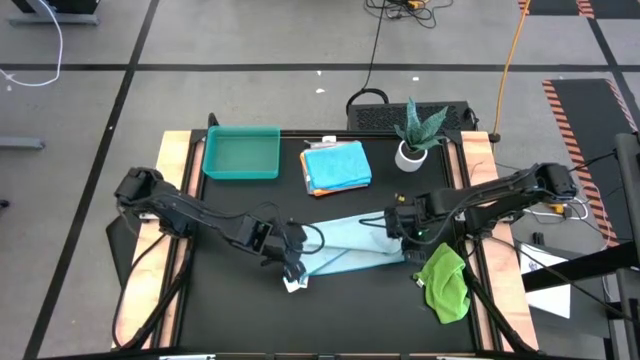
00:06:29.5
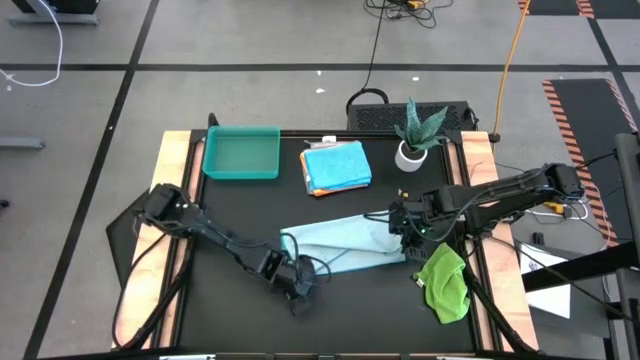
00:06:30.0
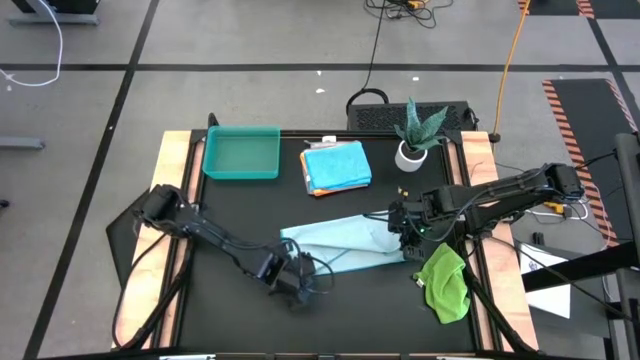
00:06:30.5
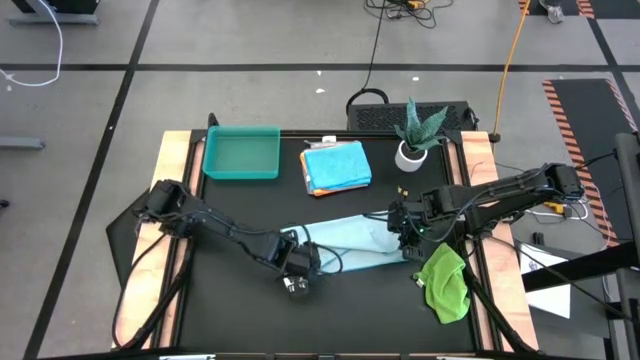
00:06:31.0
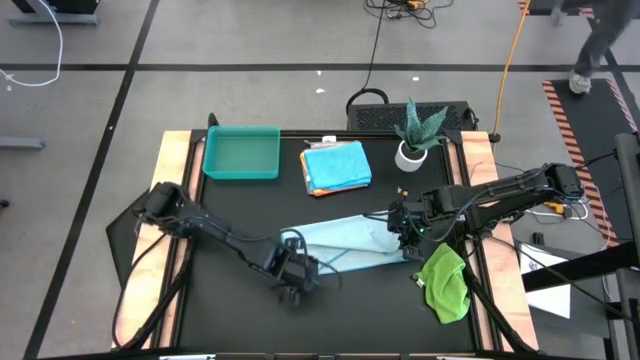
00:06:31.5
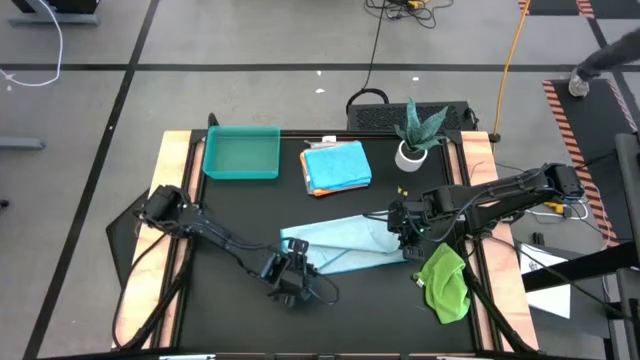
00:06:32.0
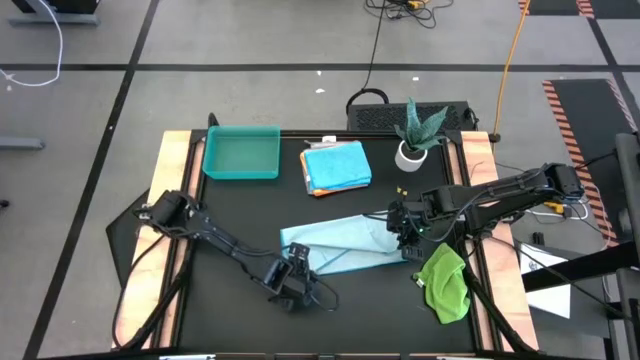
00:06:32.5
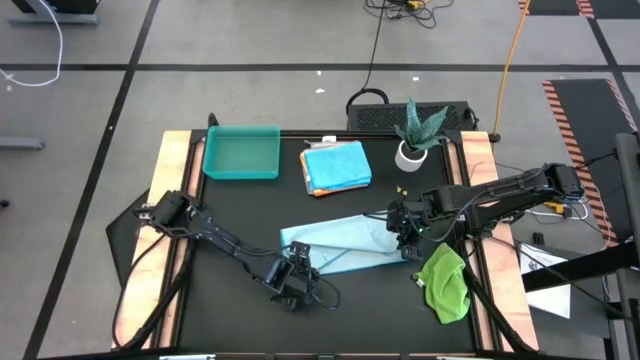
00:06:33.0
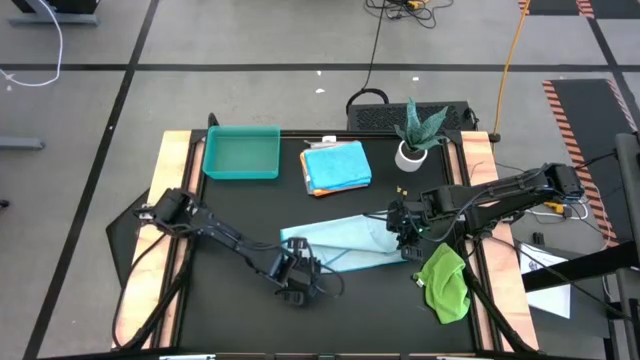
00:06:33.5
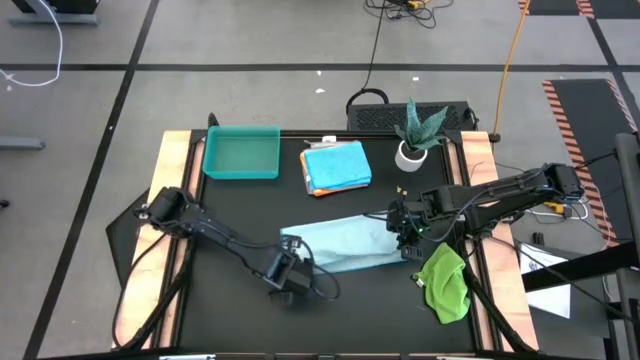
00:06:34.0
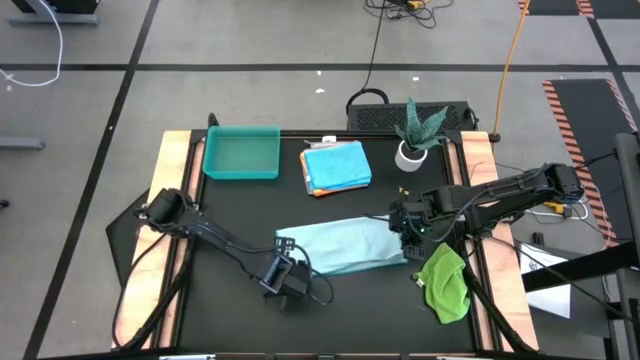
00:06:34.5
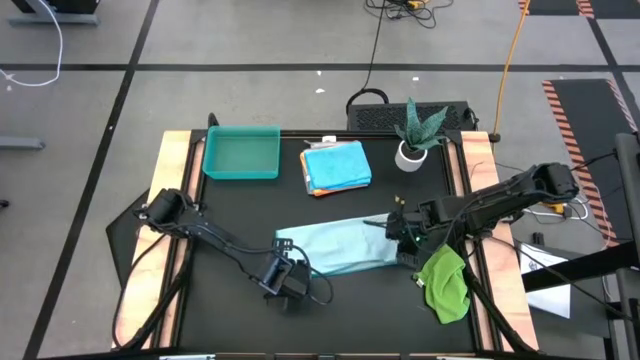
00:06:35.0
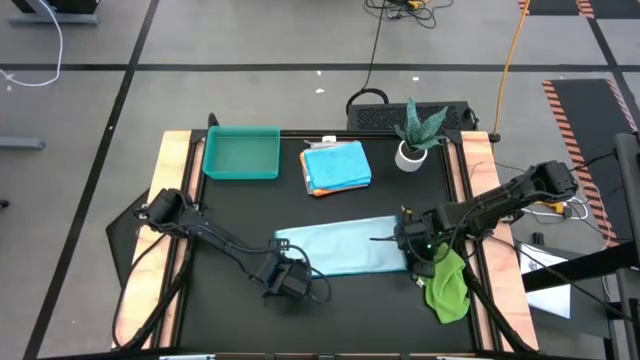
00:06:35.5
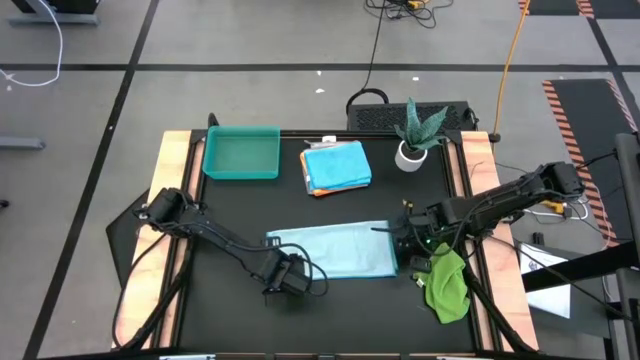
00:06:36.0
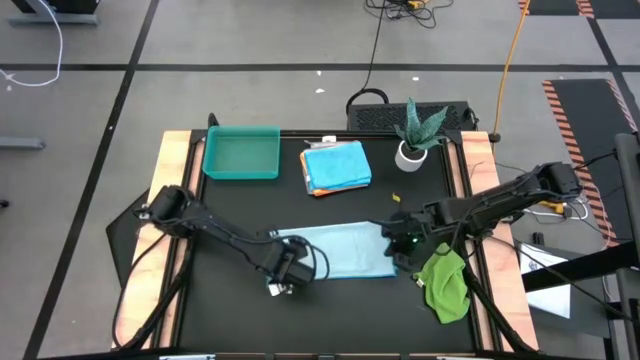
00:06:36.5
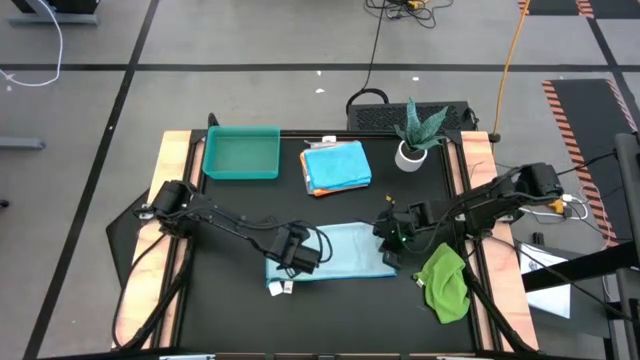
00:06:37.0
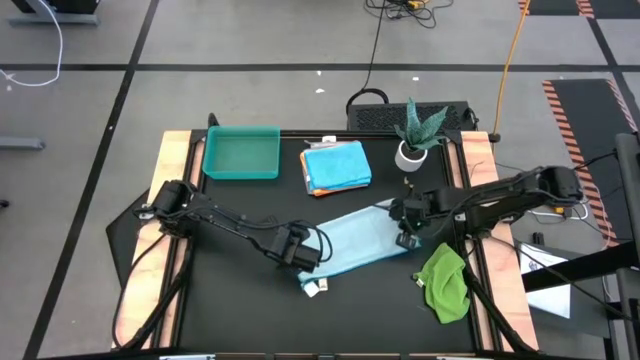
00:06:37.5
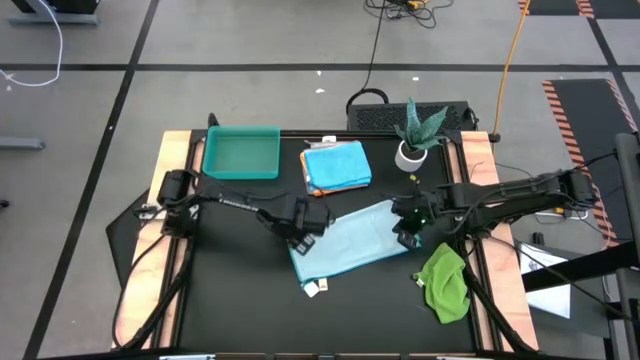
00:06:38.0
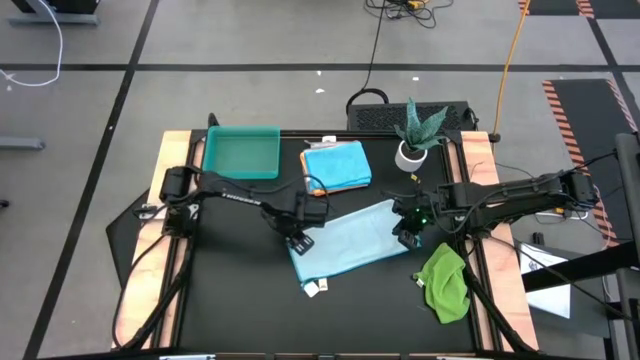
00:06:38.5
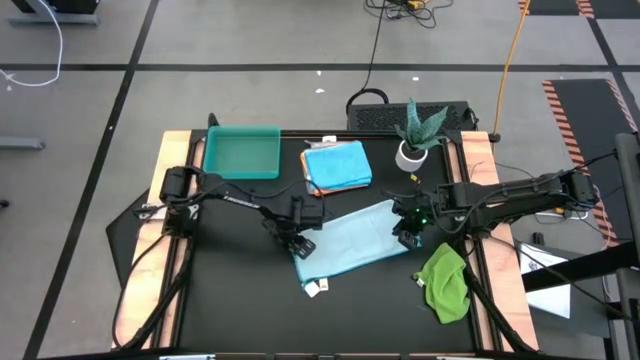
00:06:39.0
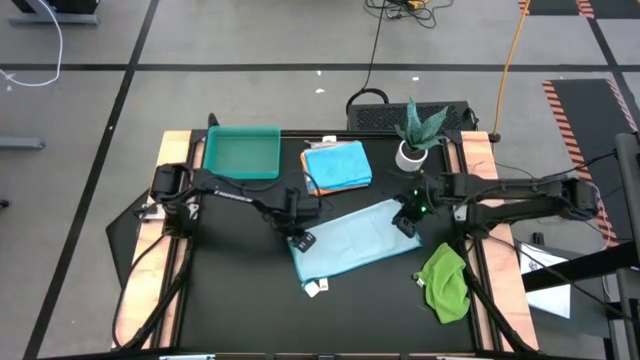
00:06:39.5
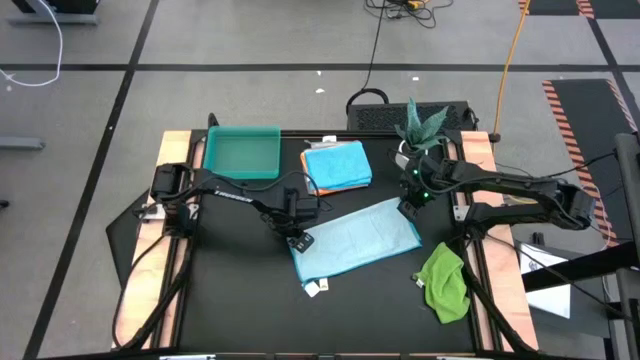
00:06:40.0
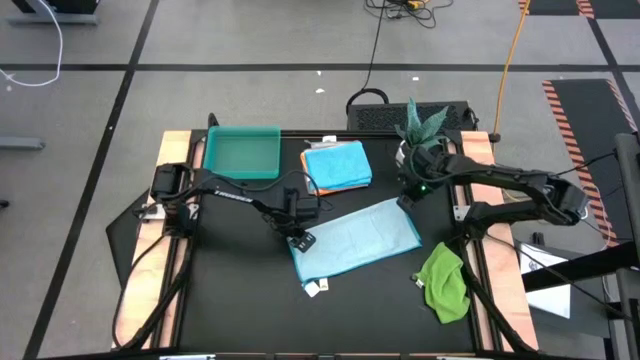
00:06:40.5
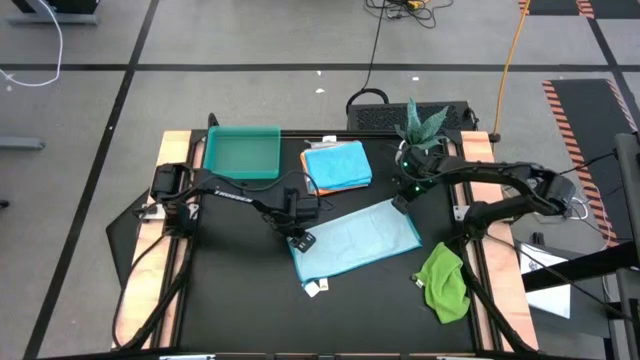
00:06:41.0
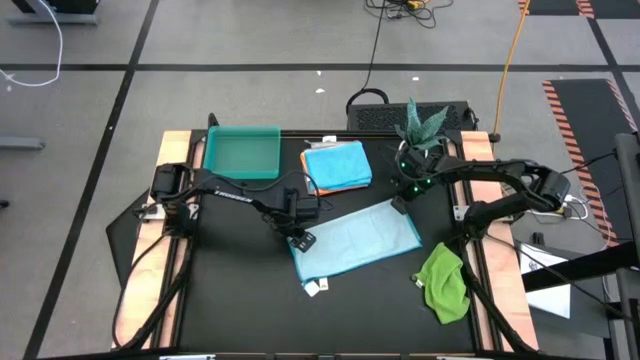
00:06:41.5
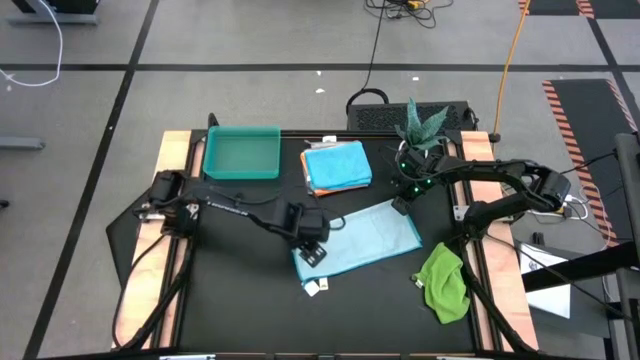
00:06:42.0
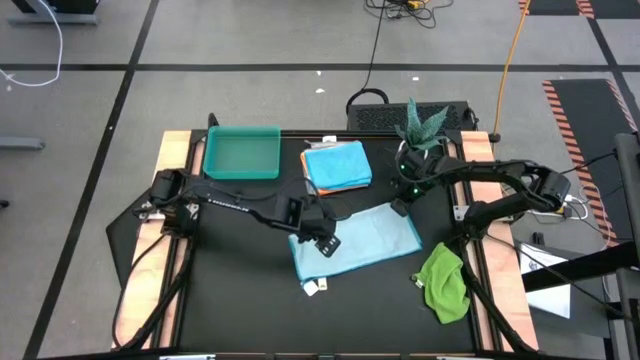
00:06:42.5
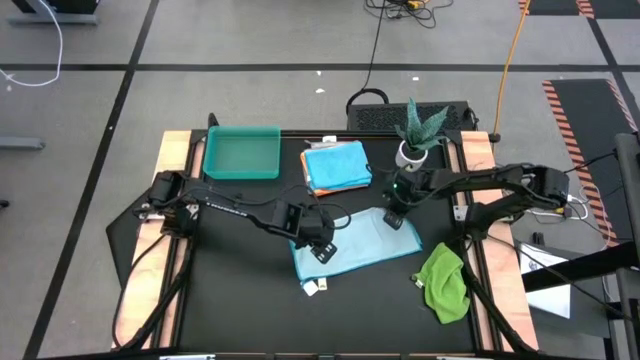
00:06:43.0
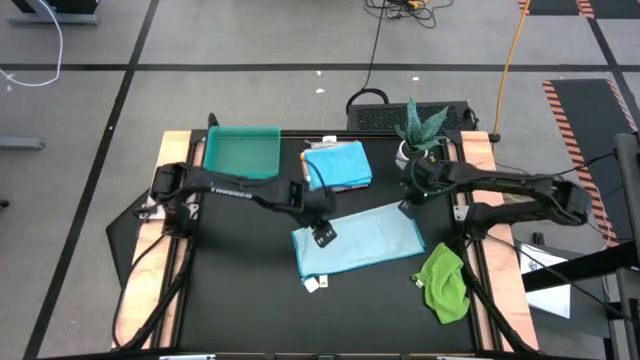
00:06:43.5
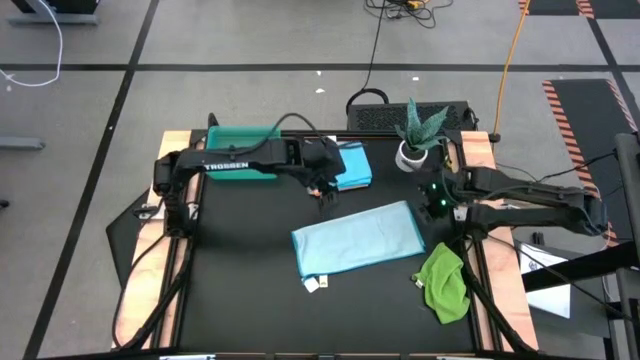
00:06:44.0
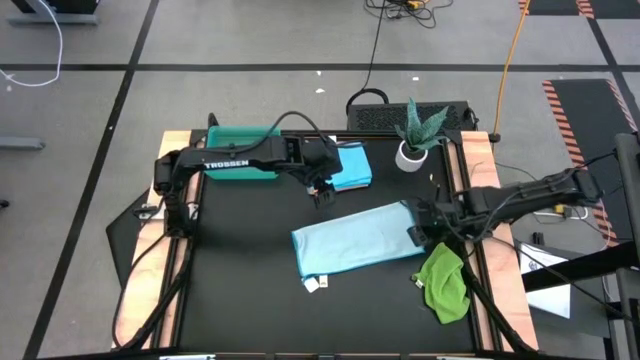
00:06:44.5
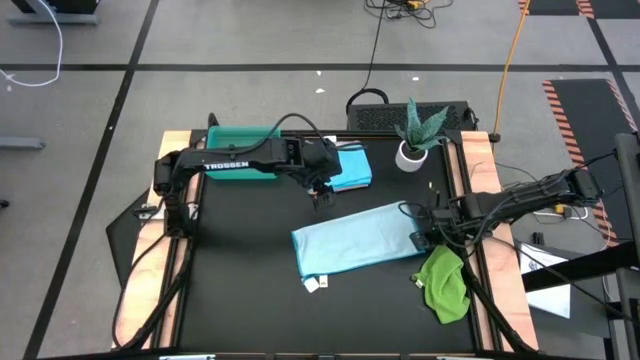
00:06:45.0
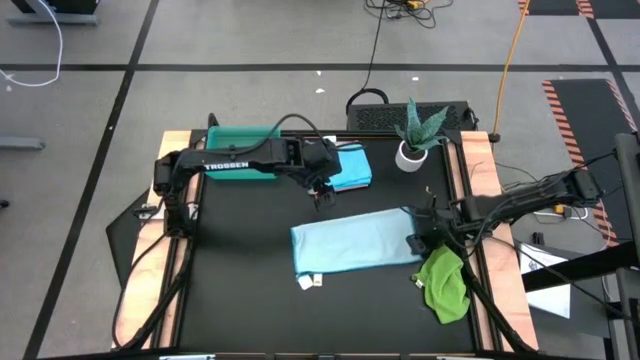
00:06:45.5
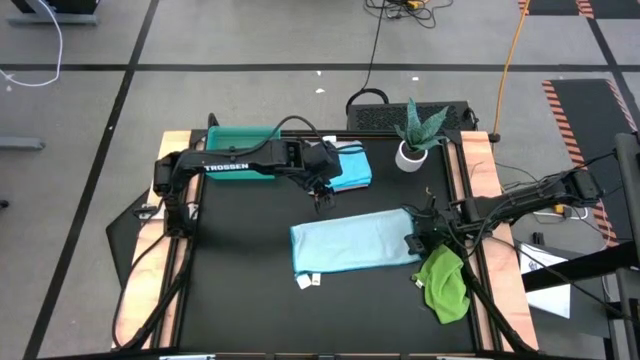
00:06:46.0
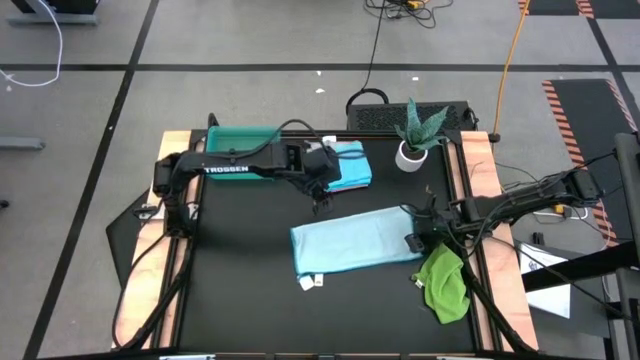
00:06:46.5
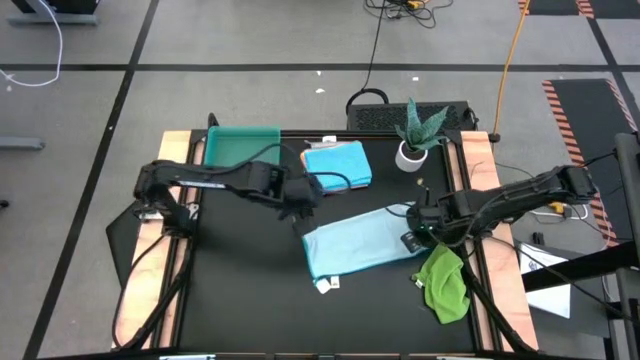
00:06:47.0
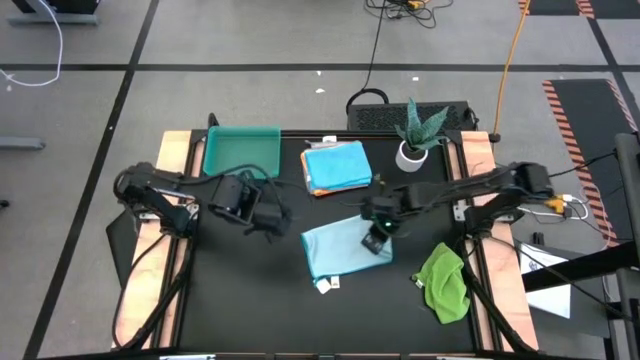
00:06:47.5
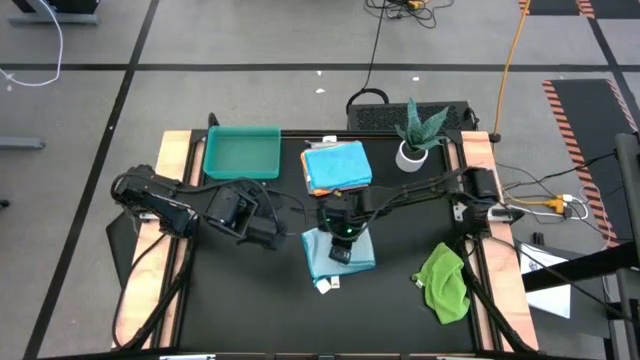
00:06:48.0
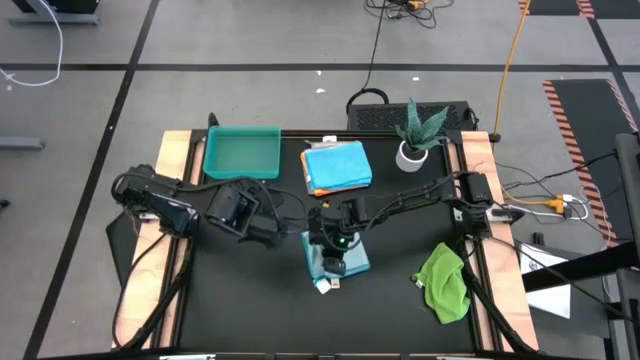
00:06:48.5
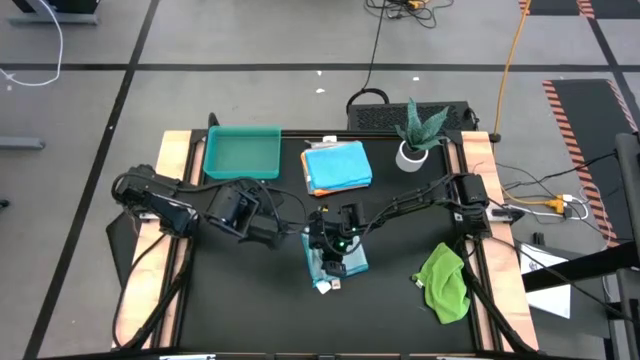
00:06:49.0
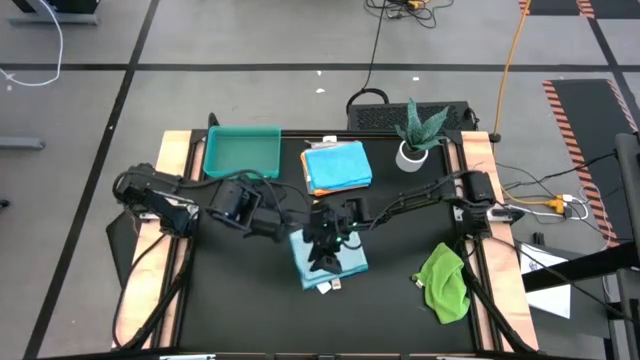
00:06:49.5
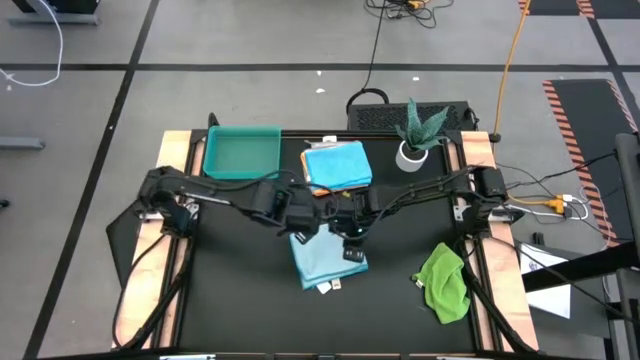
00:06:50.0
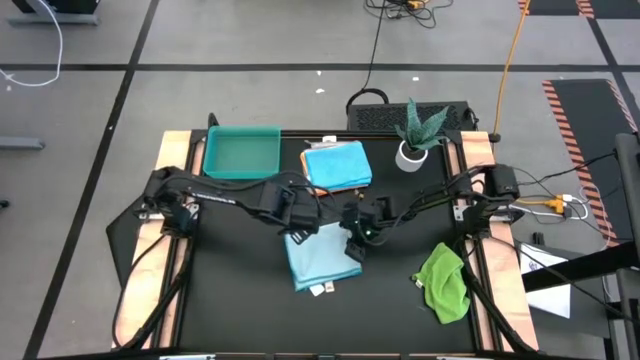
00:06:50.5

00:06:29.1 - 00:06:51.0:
Task: Fold microfiber towels
Fold the light blue microfiber towel
